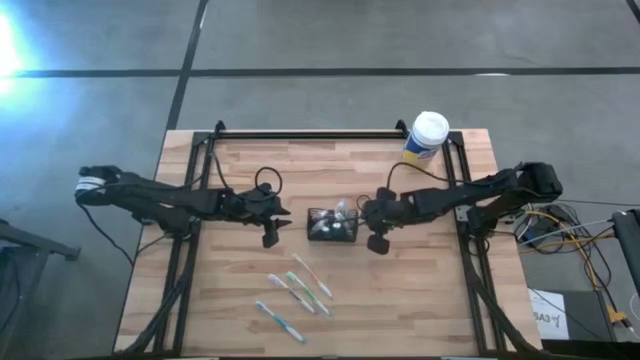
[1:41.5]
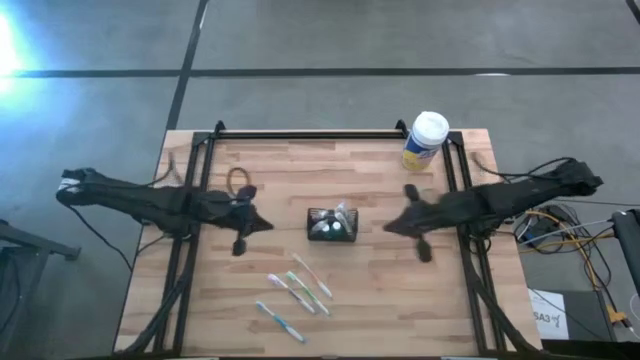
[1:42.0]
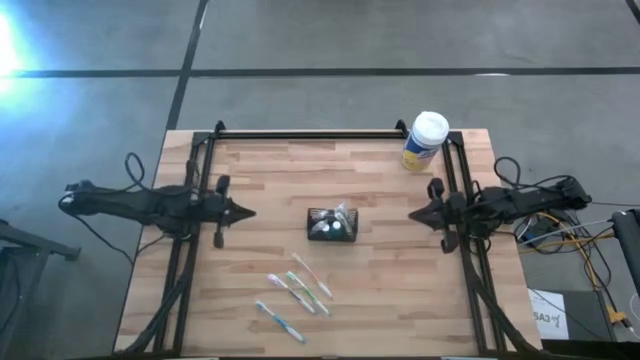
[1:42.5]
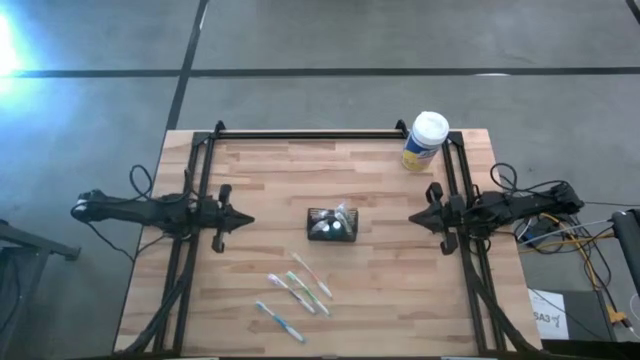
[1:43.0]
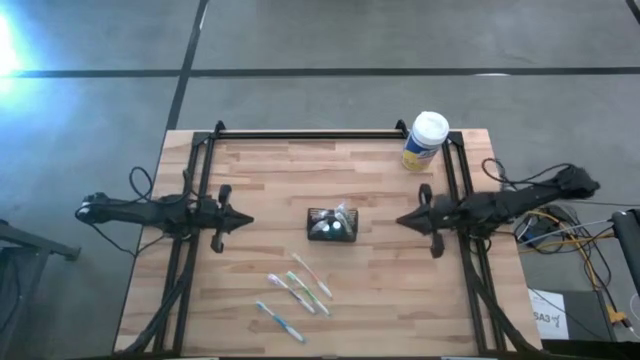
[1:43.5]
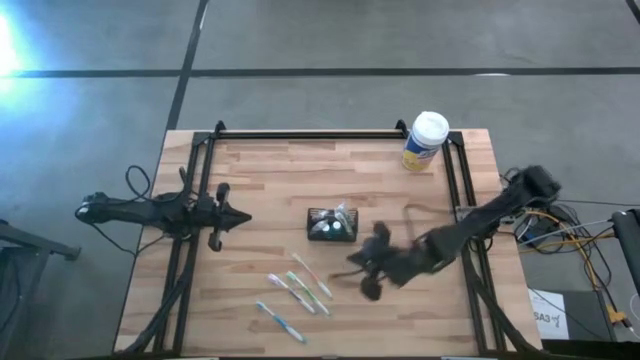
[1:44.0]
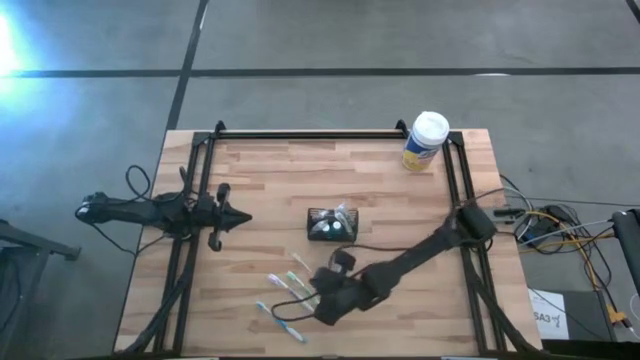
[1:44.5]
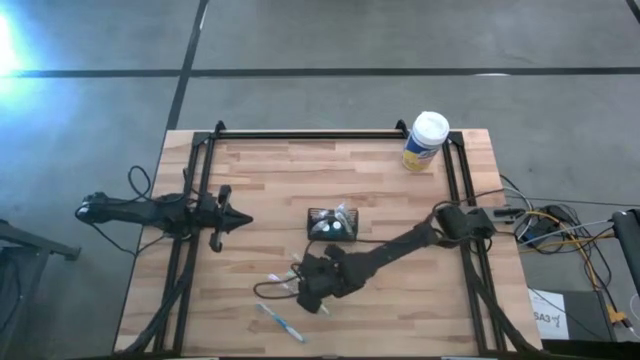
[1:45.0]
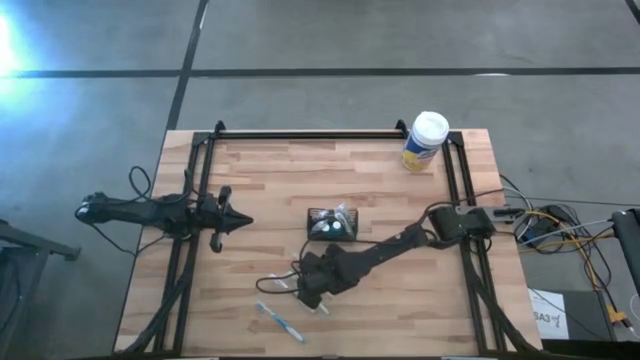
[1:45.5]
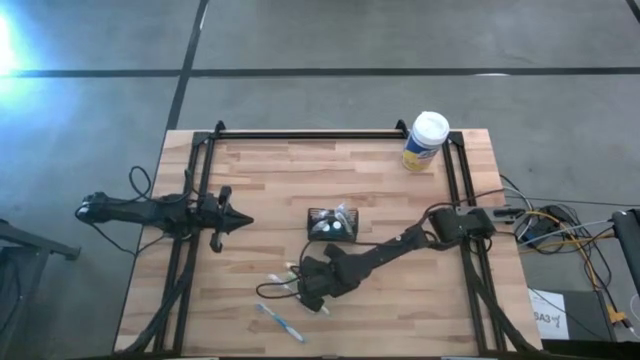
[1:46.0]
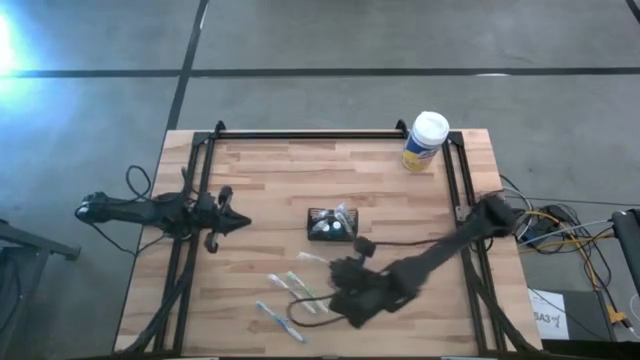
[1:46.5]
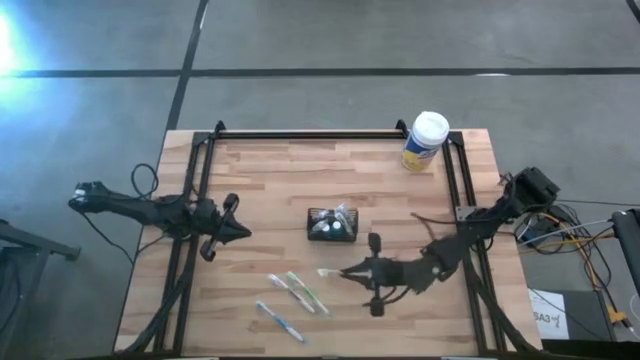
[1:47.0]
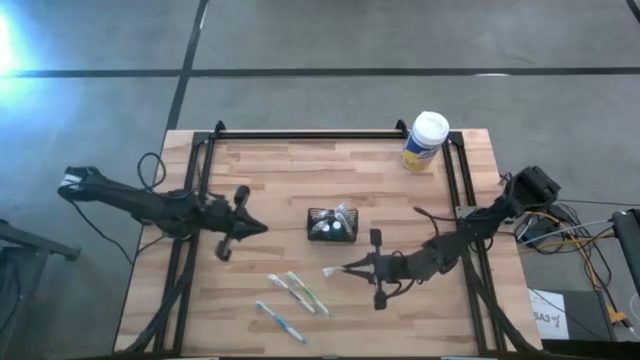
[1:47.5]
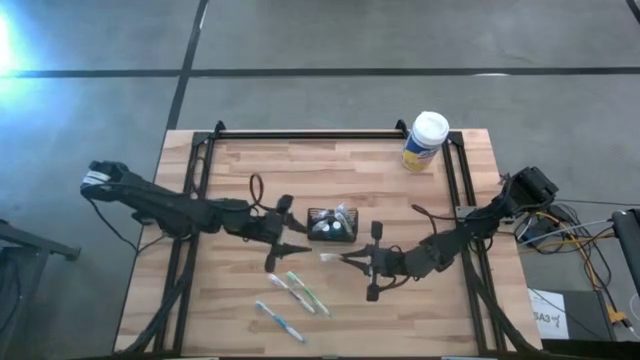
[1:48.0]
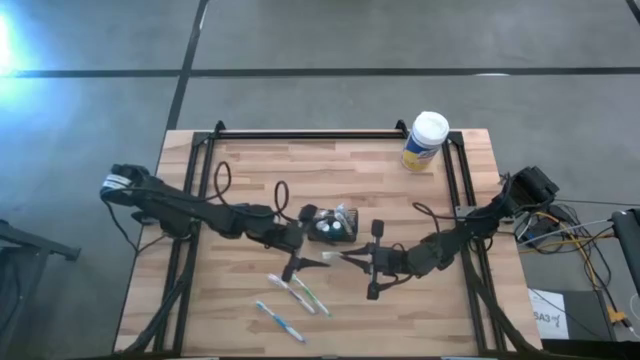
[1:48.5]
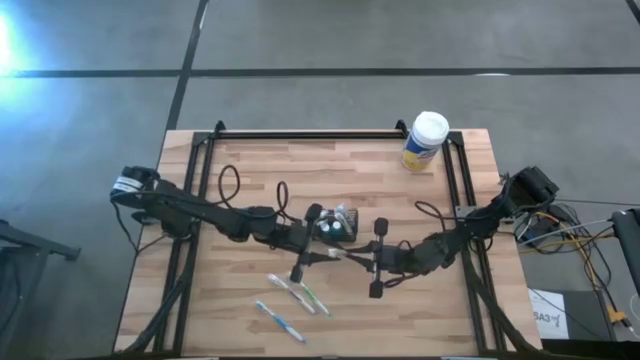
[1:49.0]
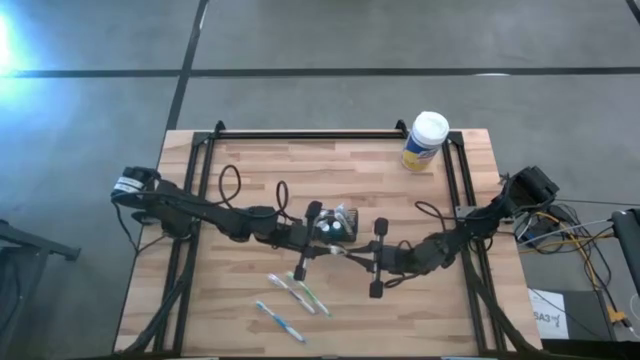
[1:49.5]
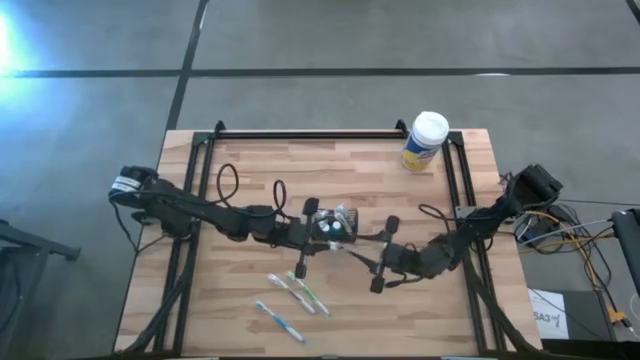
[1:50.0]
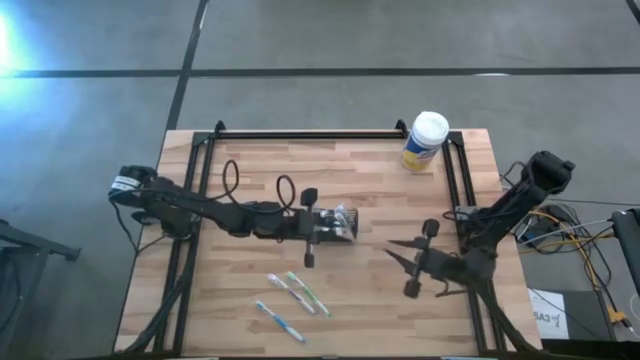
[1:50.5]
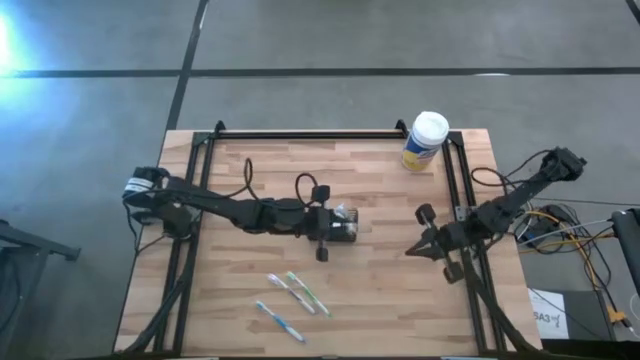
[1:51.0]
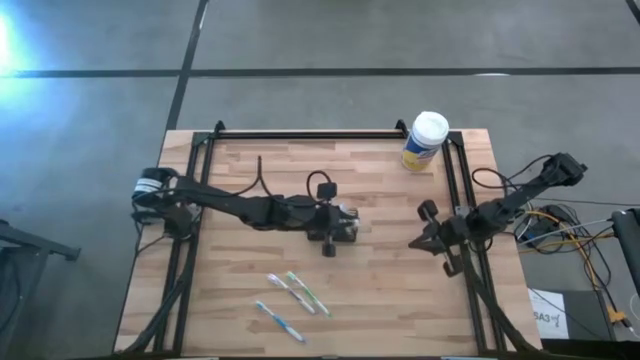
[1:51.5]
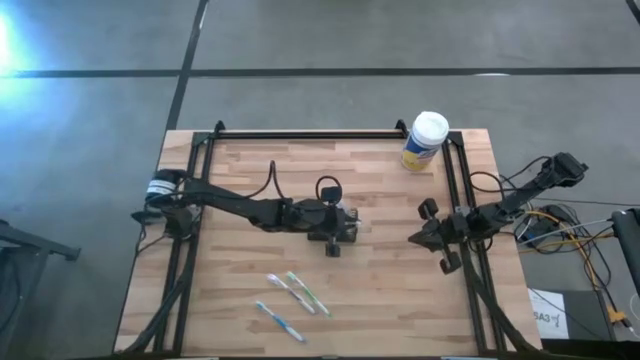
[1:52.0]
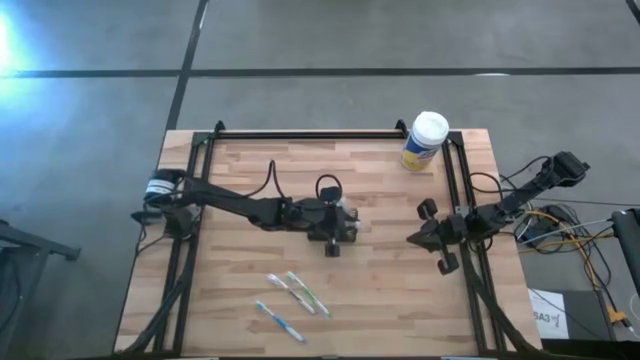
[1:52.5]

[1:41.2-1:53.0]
Task: Pick & Place toothbrushing station
Put the orange toothbrush into the black wire organizer

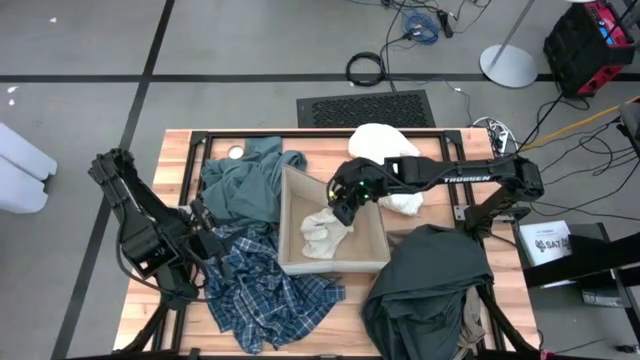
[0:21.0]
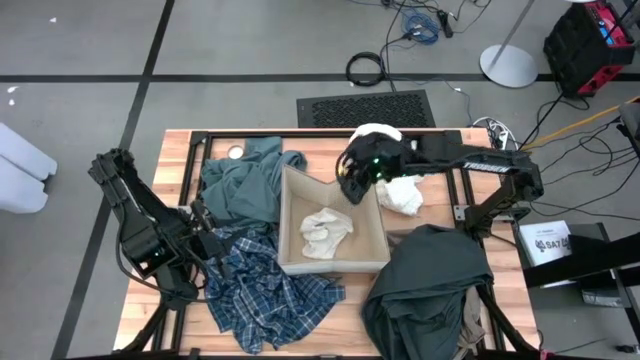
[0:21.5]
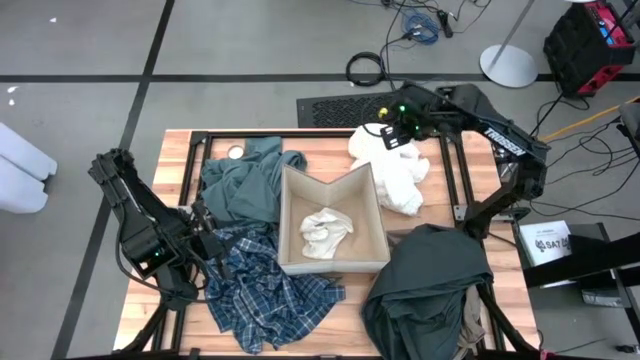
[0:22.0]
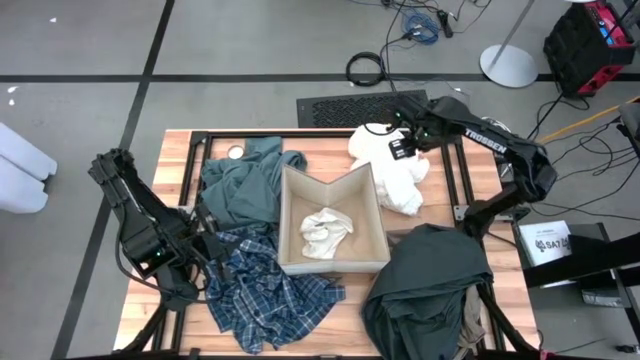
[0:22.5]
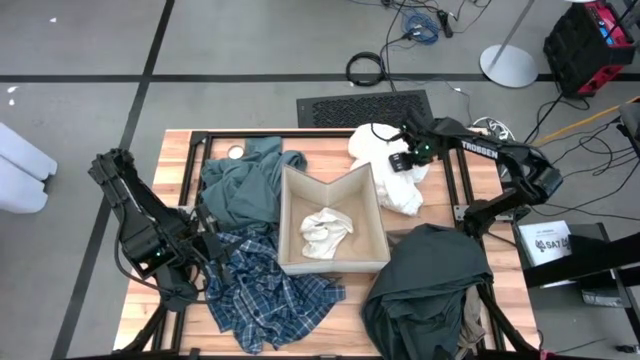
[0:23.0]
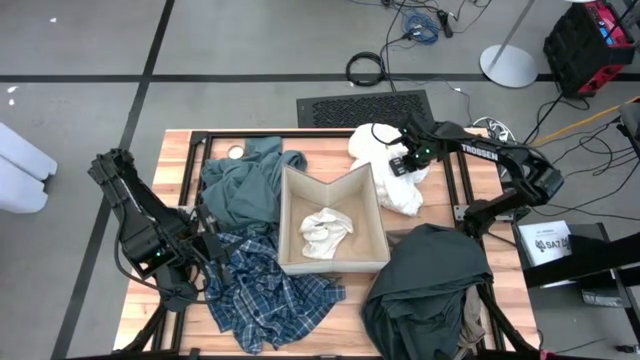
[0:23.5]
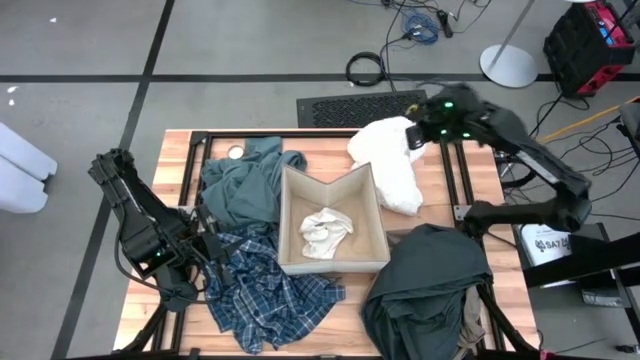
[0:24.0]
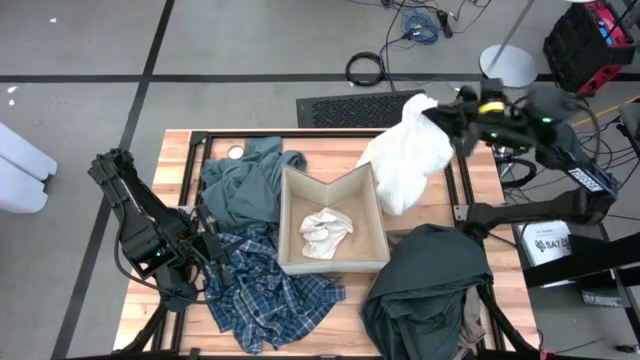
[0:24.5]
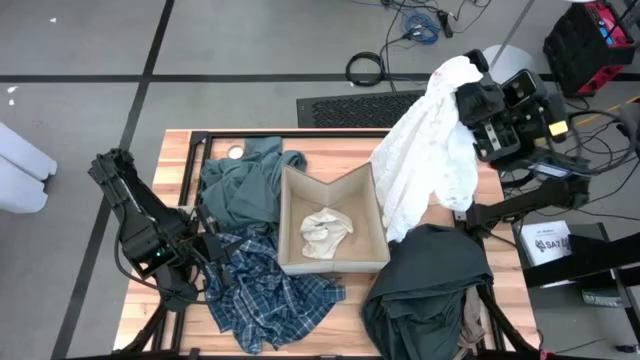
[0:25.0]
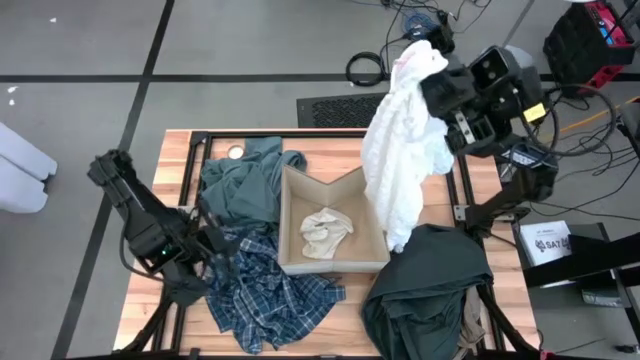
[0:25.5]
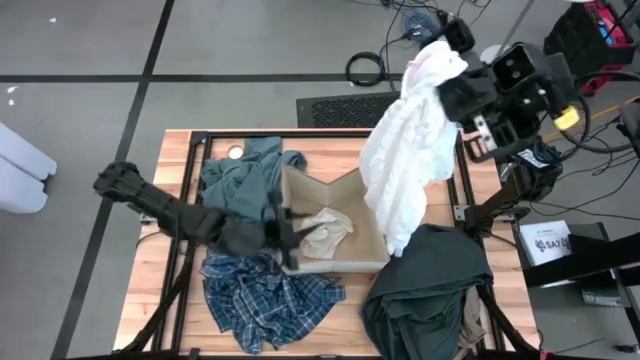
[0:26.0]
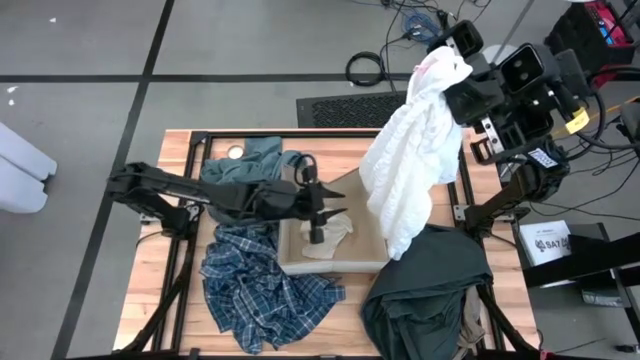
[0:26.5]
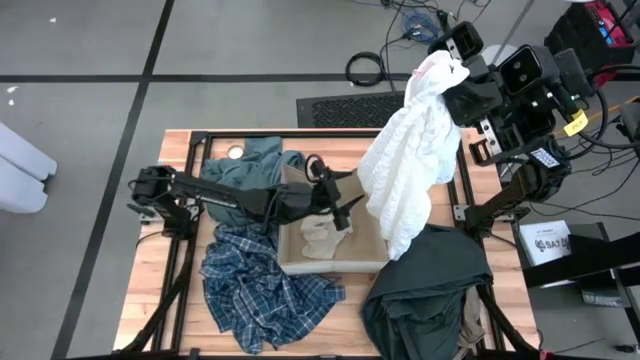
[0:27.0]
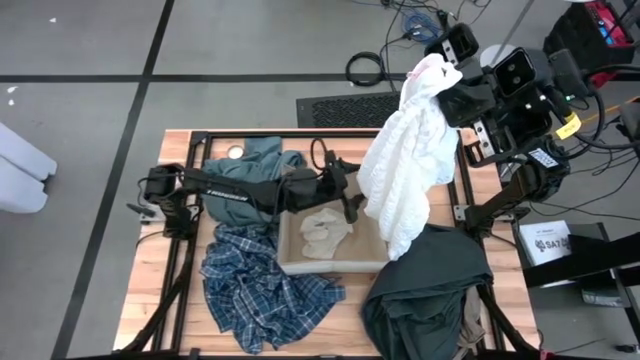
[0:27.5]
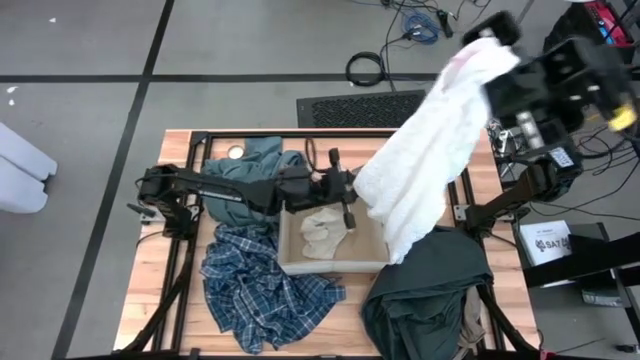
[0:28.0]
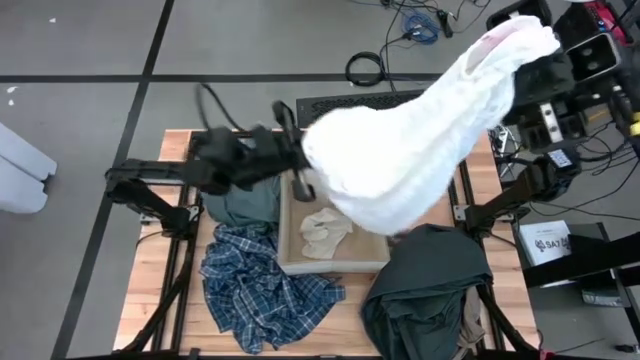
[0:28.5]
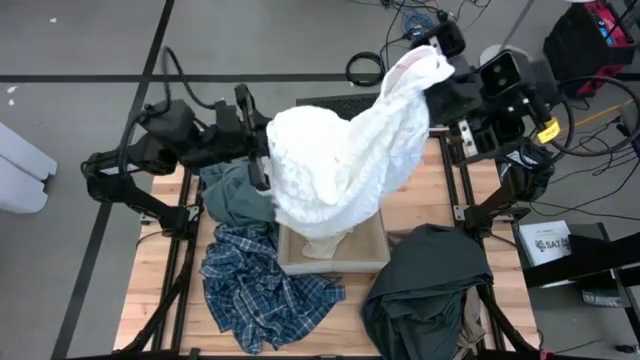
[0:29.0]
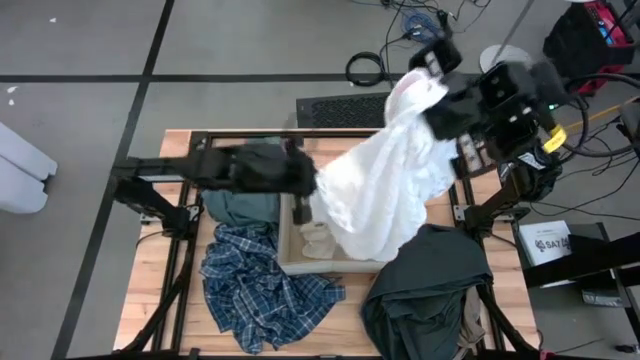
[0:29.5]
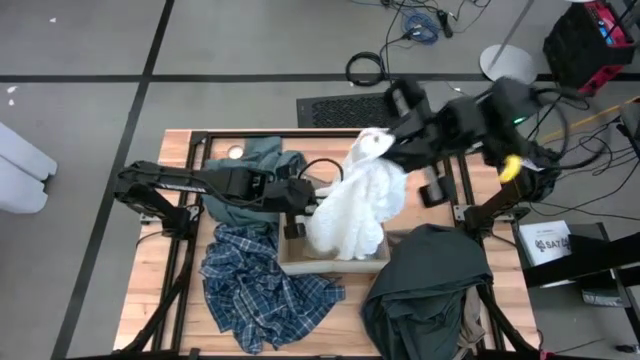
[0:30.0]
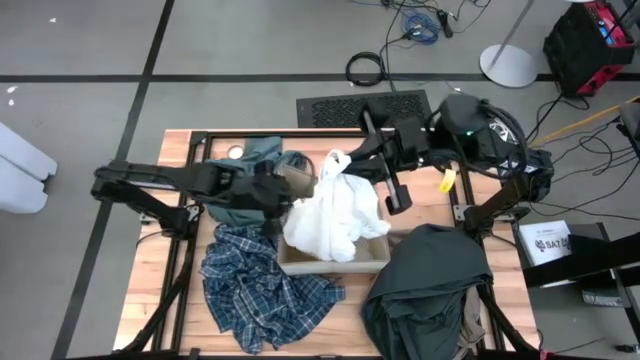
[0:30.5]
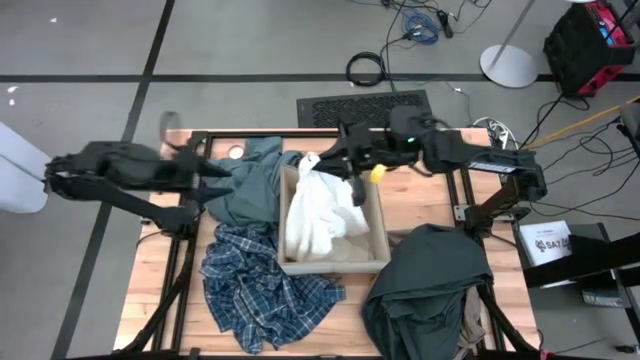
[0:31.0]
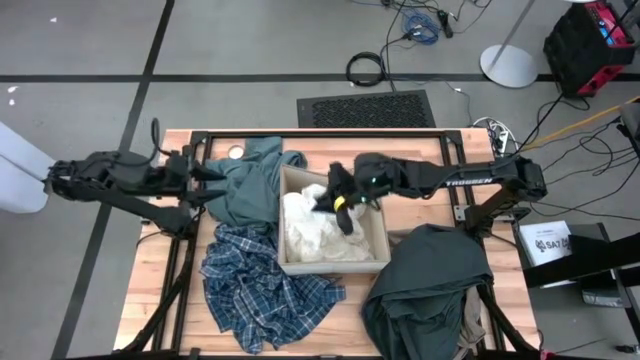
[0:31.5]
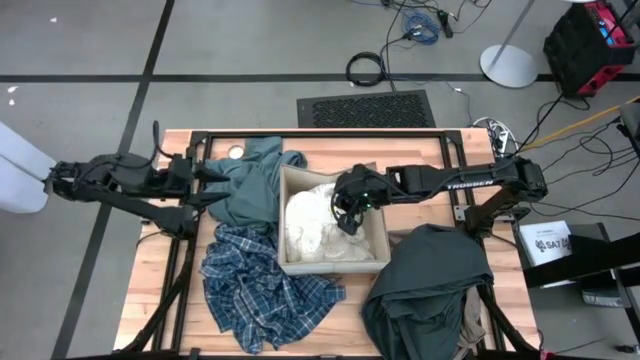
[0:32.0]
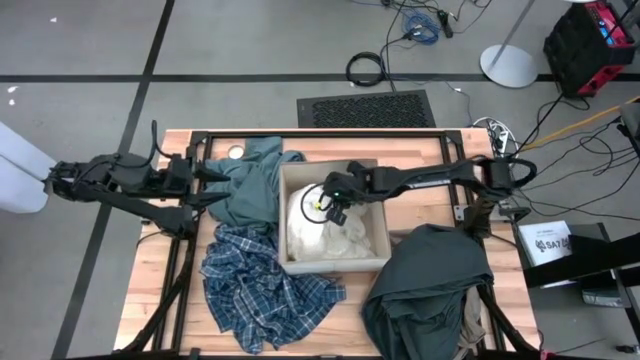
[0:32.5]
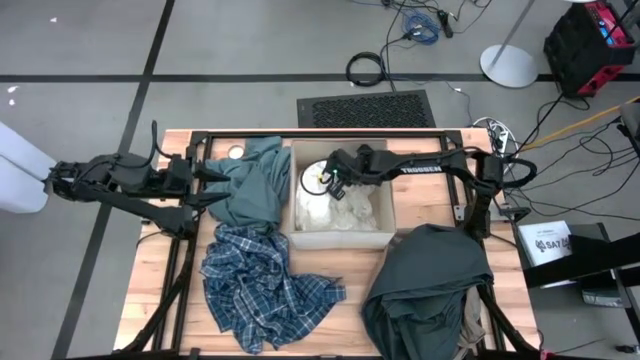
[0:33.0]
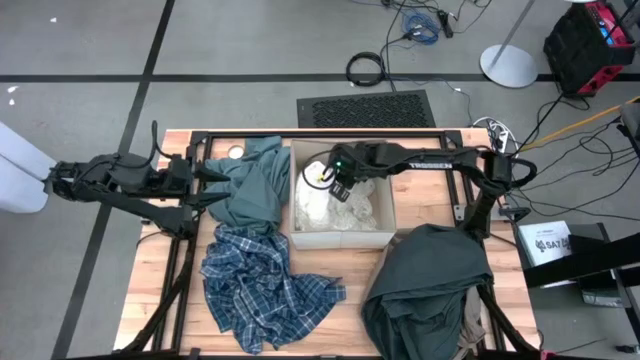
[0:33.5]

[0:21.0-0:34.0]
Task: Sort clothes
Put the white shirt into the laundry organizer
